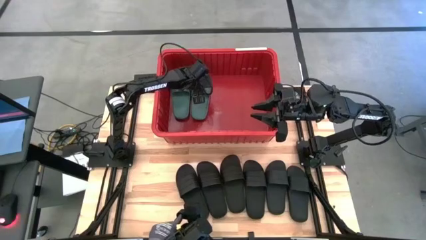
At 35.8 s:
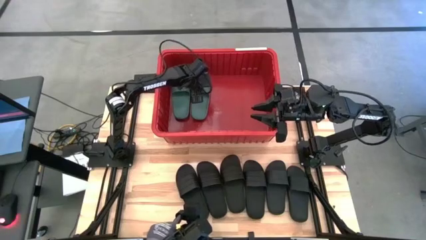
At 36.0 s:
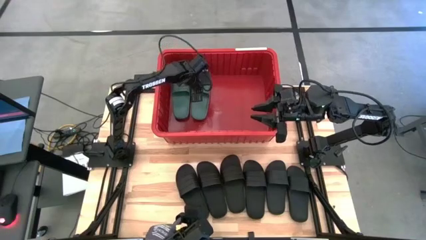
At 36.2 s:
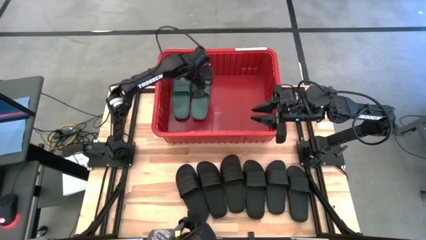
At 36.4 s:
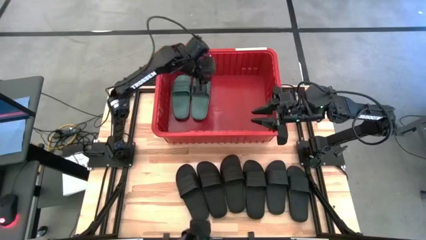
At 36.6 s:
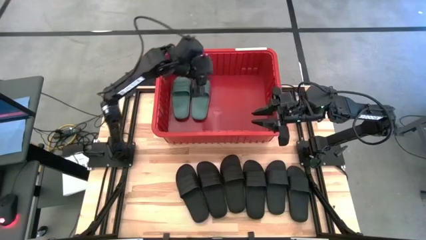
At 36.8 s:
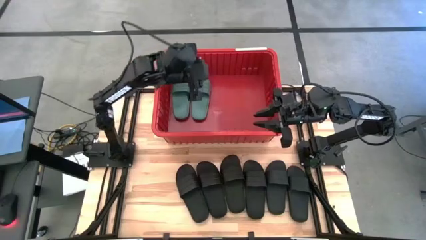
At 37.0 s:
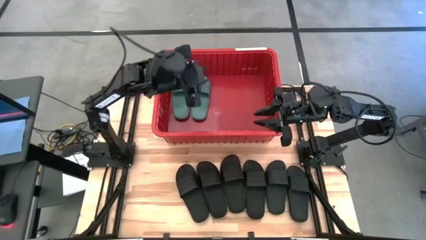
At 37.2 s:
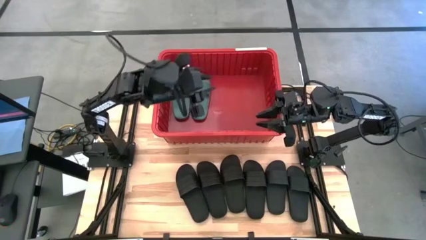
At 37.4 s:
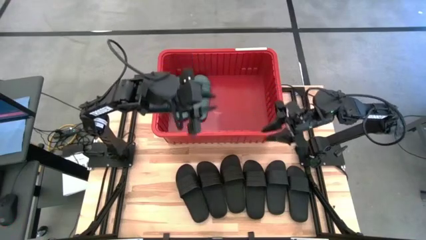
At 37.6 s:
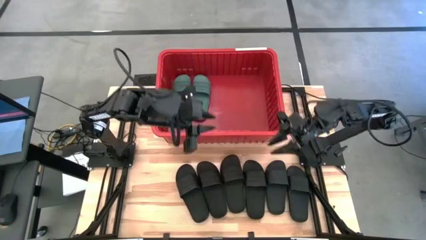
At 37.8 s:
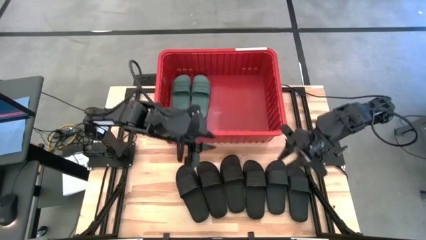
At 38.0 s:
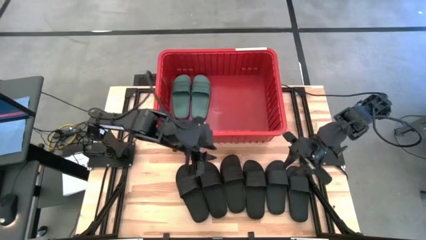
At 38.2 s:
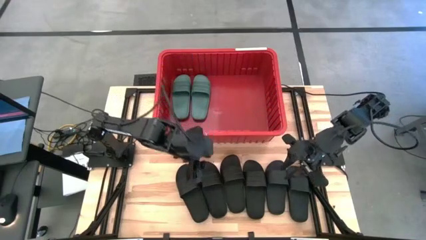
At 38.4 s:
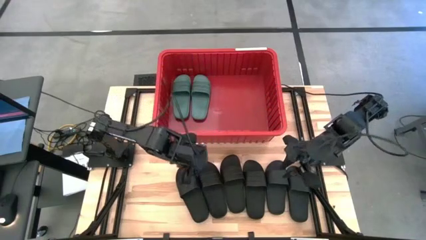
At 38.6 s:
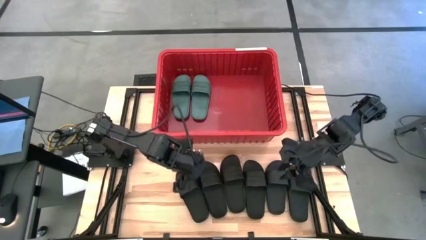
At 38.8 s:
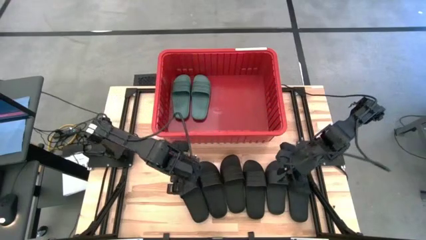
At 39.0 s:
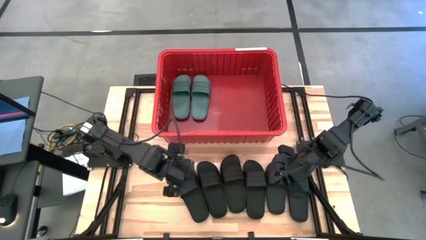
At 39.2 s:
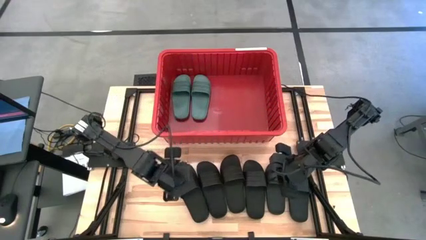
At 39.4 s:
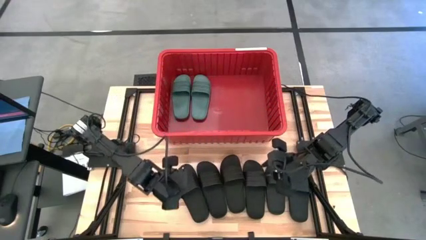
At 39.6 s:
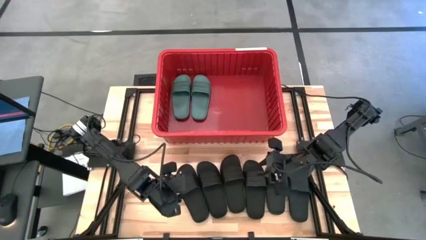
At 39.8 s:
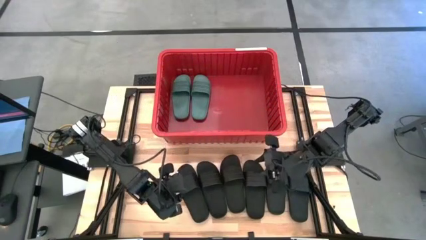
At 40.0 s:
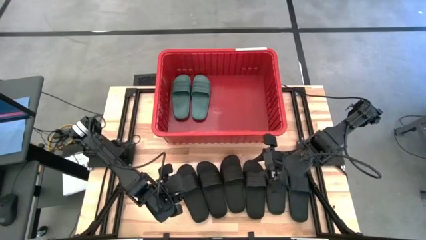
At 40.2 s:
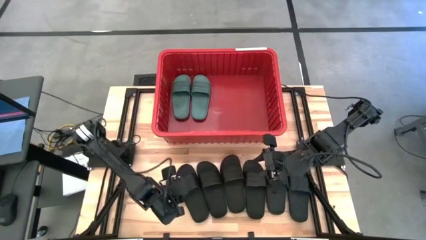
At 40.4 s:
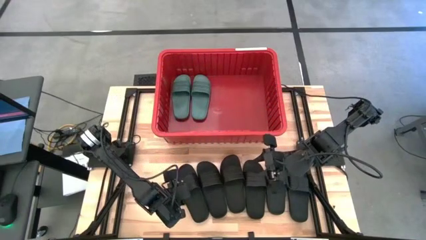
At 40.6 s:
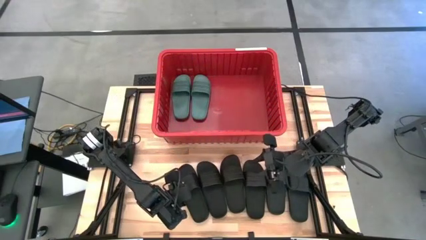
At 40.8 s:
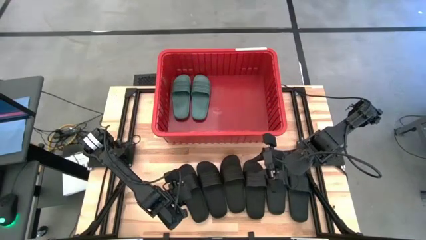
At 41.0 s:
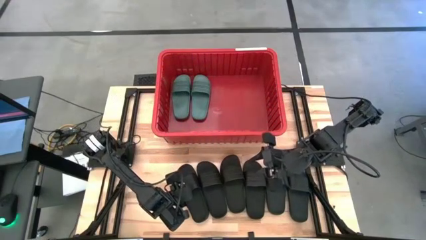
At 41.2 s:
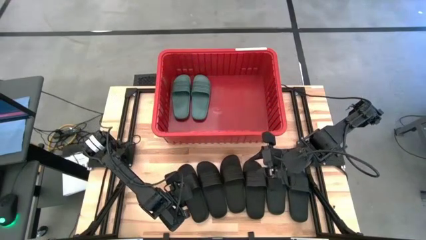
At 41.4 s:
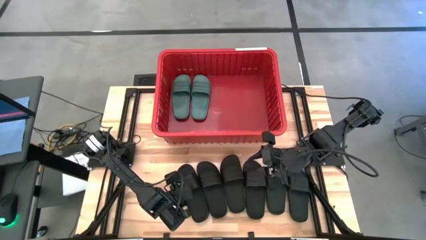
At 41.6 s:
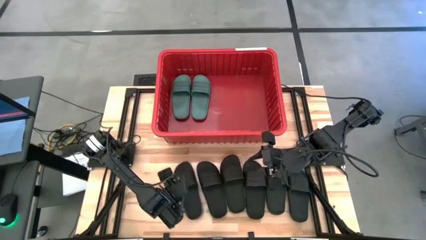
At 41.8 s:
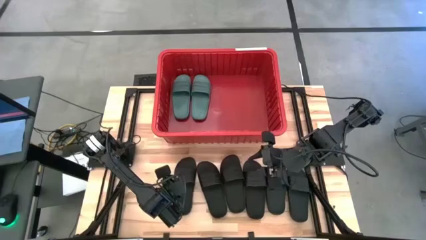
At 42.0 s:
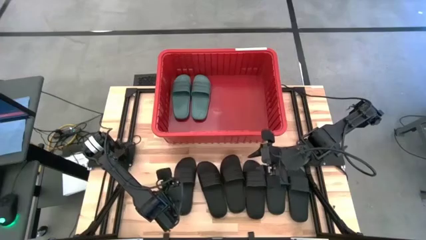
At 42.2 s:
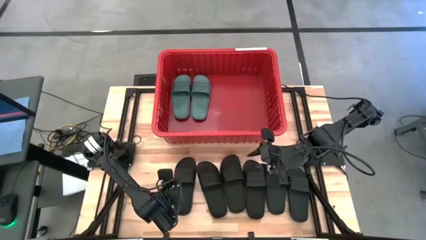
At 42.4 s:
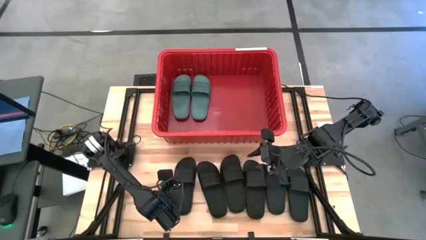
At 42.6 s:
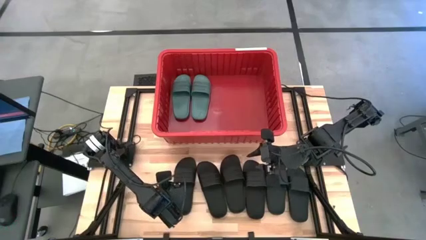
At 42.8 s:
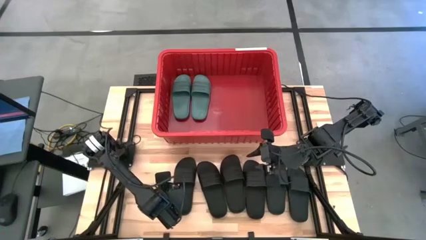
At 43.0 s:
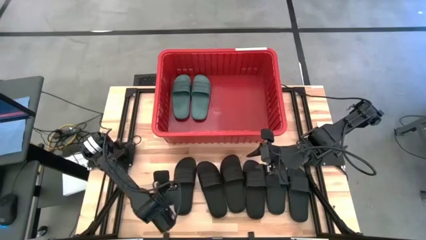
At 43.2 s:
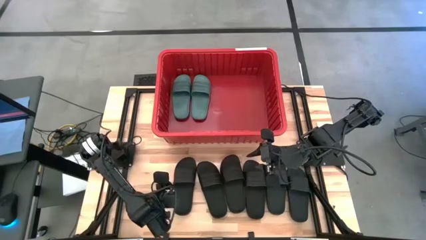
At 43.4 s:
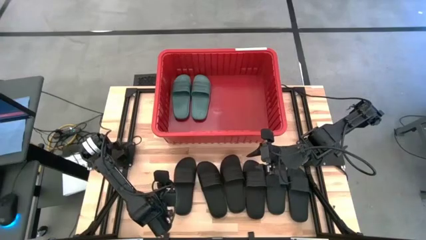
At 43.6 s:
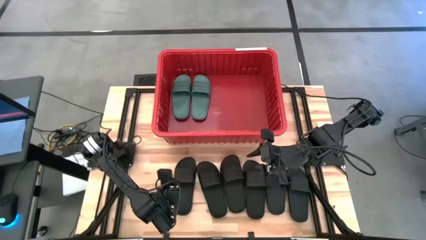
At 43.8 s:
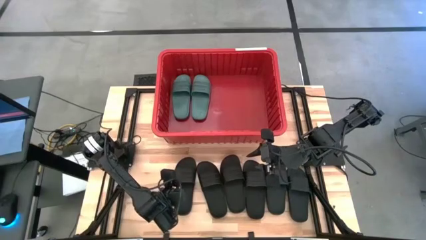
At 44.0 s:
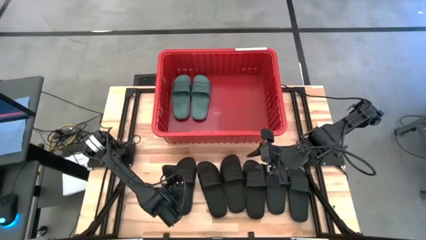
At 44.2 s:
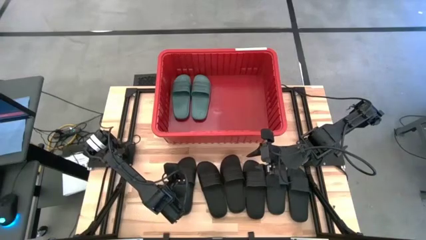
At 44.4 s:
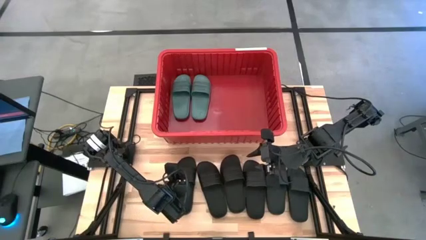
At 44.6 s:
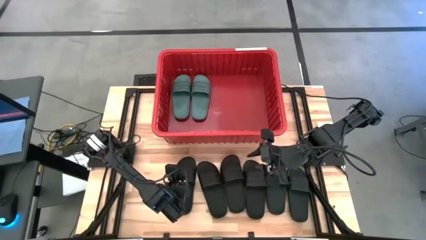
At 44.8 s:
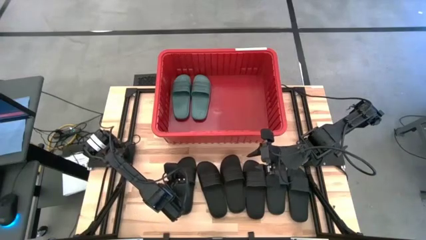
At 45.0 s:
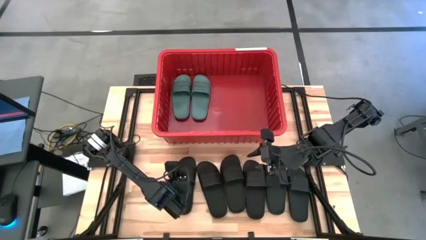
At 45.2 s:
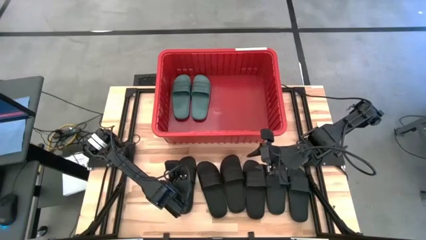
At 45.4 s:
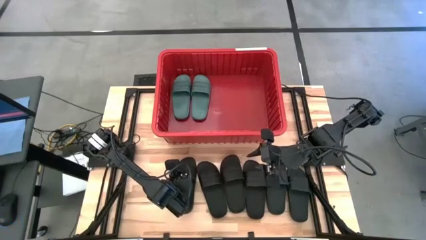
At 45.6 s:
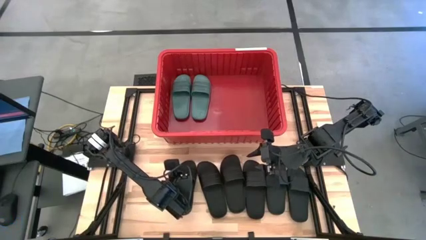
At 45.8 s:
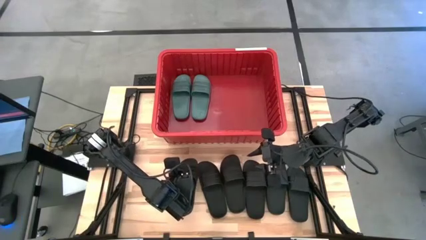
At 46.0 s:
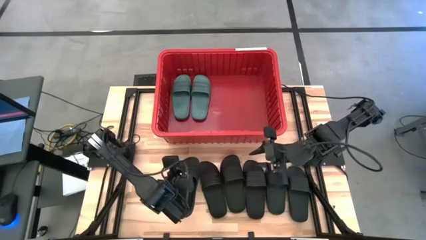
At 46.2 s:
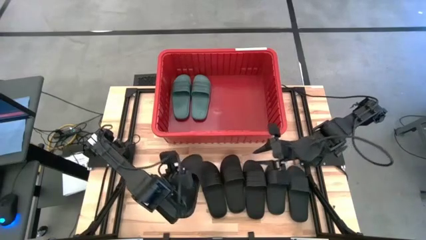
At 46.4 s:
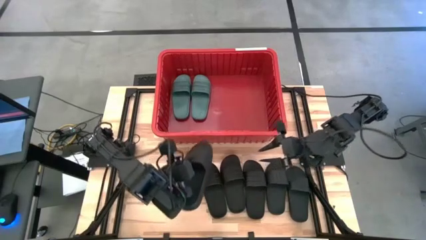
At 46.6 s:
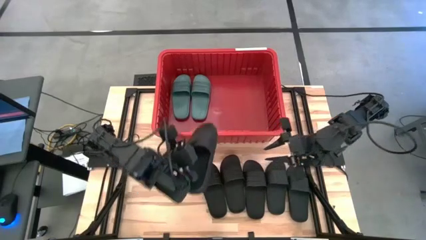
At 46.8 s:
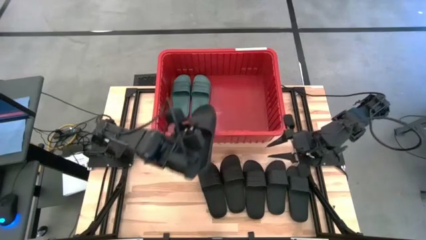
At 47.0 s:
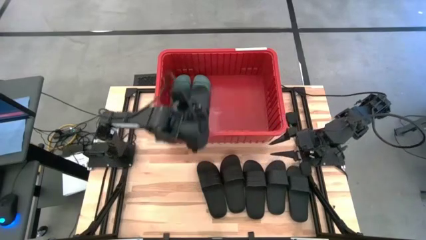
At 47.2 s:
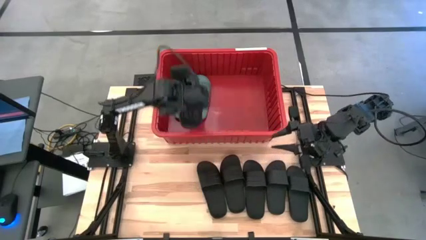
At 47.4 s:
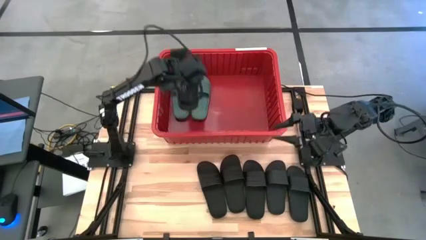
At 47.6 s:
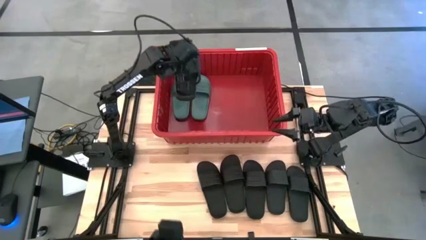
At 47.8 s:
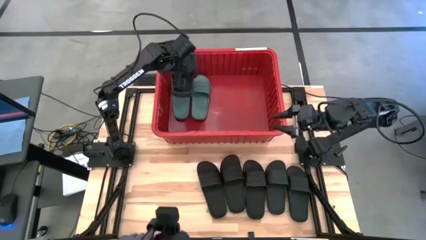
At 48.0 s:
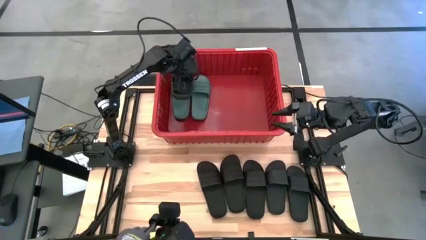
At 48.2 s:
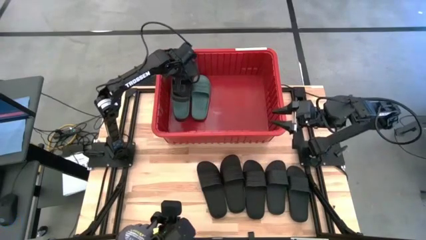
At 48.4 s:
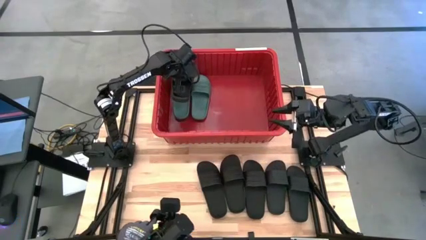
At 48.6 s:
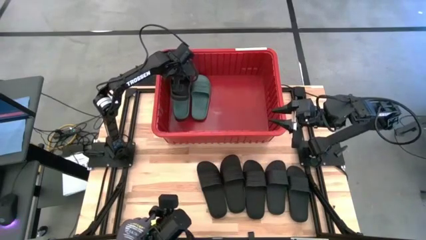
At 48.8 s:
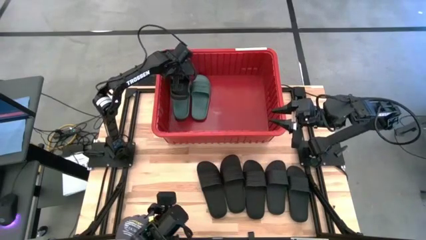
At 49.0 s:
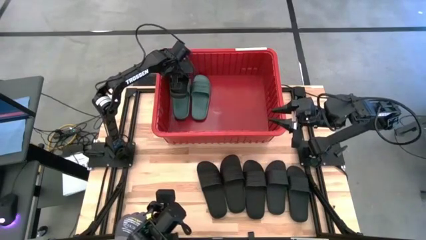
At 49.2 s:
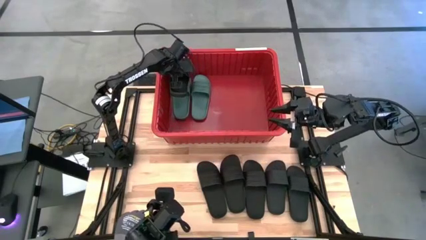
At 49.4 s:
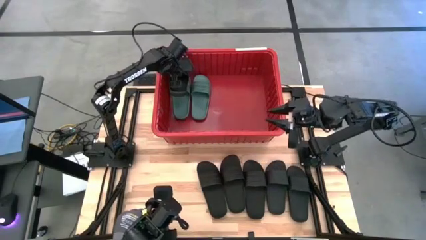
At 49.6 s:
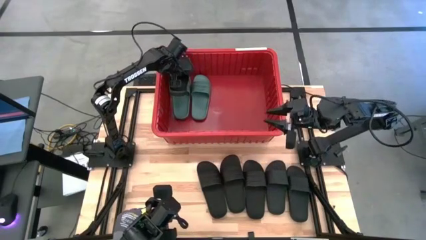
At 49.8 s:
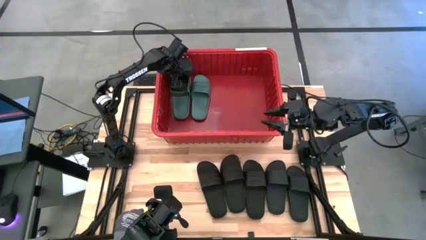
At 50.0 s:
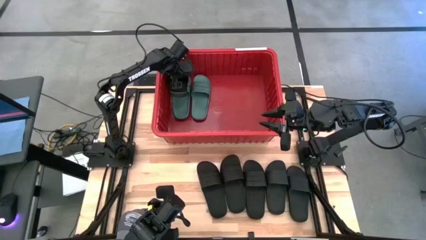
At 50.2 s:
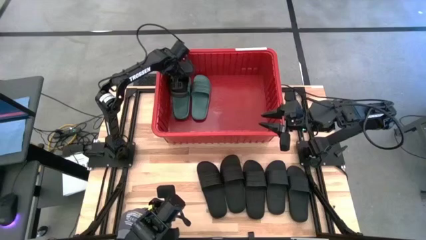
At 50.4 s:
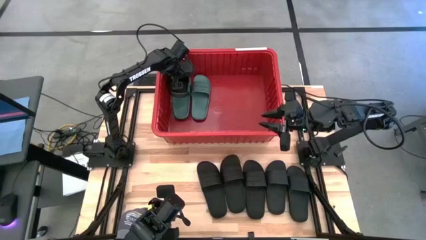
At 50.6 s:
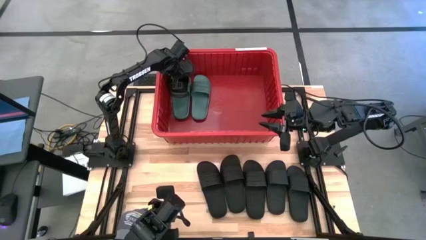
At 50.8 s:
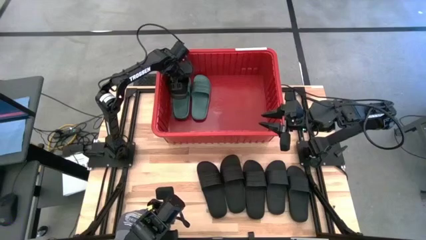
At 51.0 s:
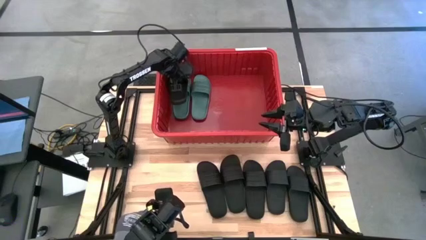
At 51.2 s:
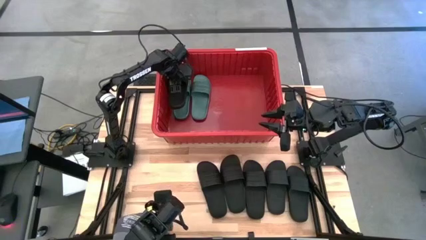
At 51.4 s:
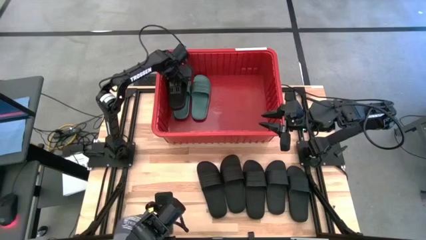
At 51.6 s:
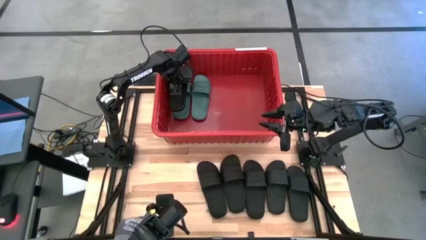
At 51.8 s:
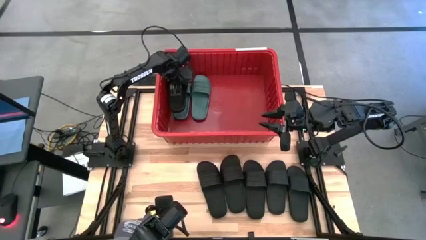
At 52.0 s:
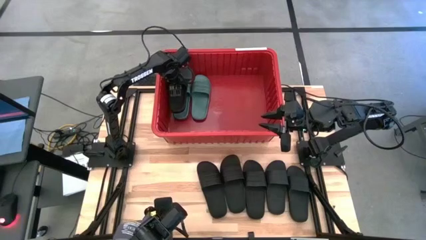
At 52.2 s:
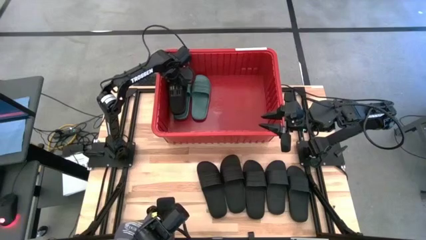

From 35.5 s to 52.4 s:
Task: Pick and place slides into bin
Put the black slide into the red bin

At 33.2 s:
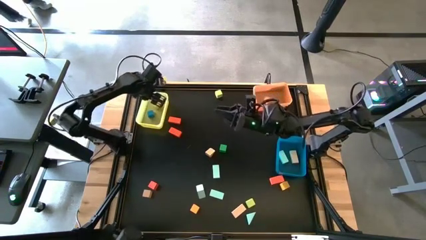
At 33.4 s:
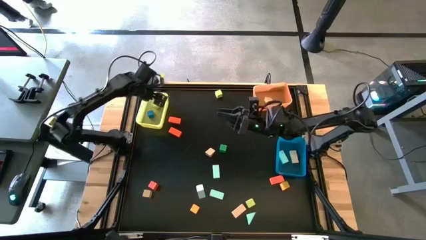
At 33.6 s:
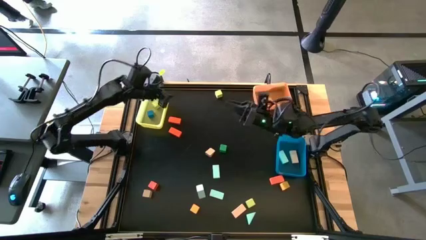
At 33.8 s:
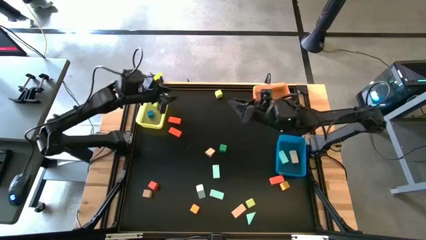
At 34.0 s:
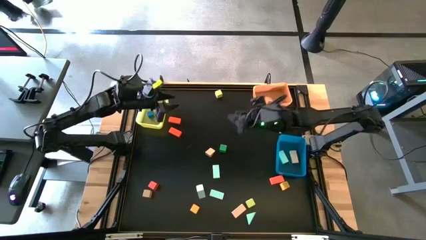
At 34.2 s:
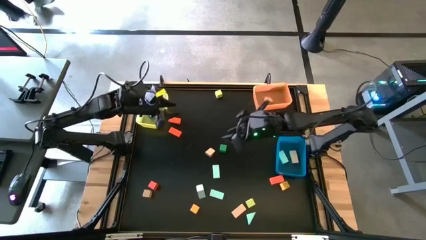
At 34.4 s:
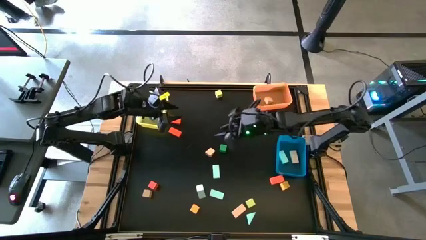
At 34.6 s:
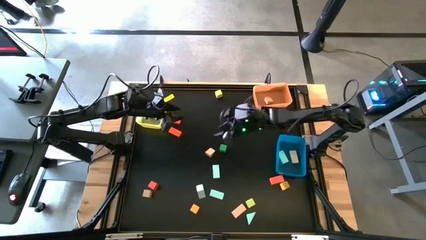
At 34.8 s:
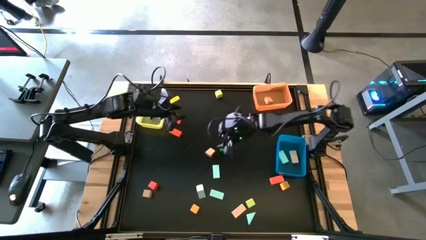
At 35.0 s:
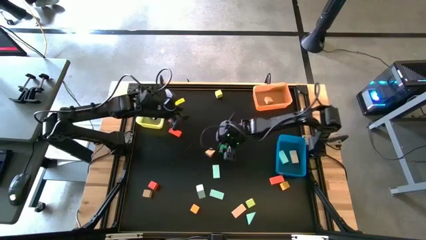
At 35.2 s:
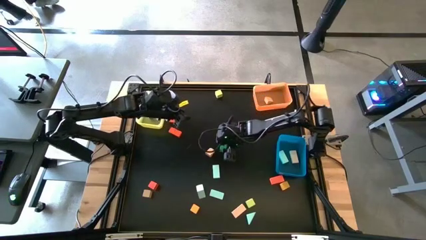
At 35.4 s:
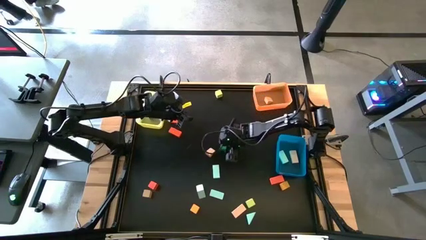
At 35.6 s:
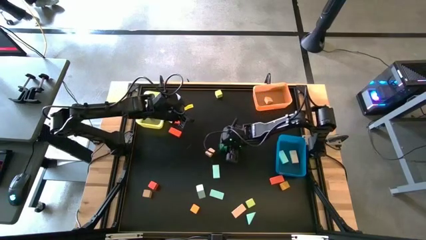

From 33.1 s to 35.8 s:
Task: Sort blocks by size
Put the green square block into the yellow bin
